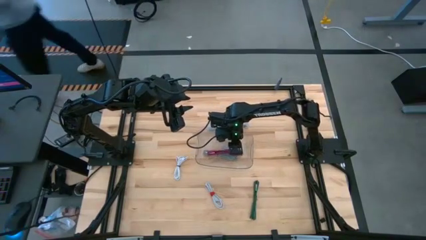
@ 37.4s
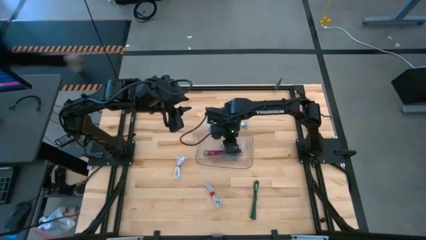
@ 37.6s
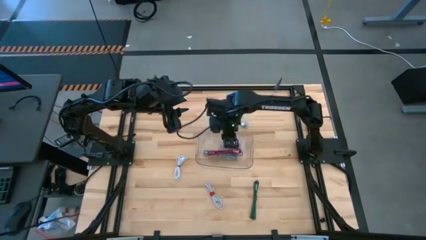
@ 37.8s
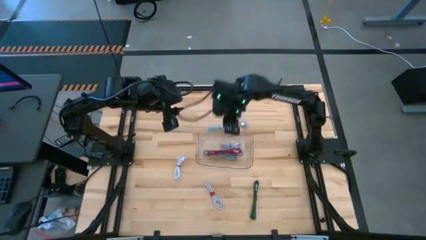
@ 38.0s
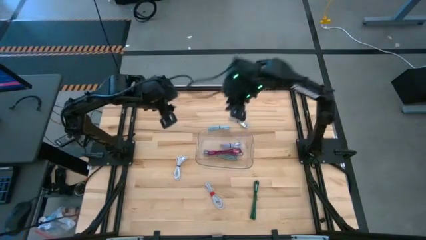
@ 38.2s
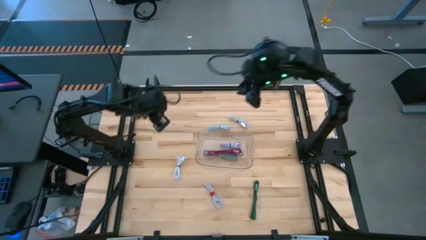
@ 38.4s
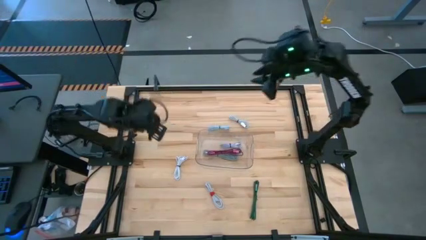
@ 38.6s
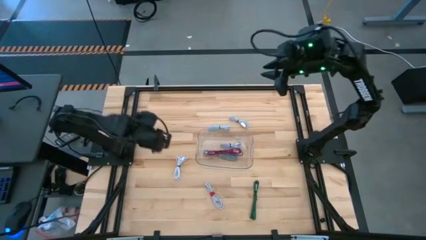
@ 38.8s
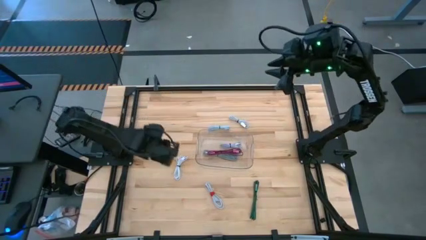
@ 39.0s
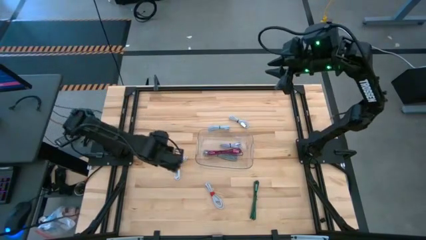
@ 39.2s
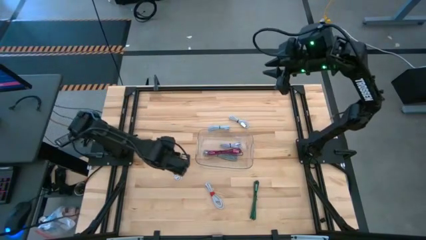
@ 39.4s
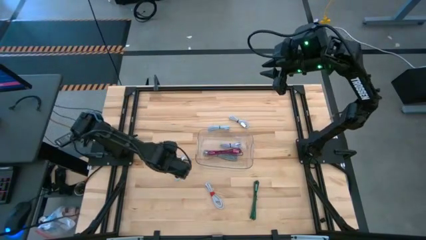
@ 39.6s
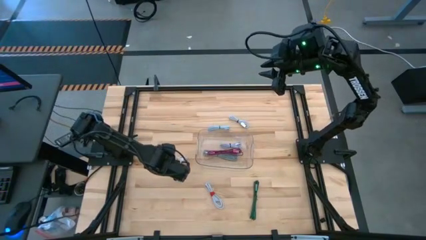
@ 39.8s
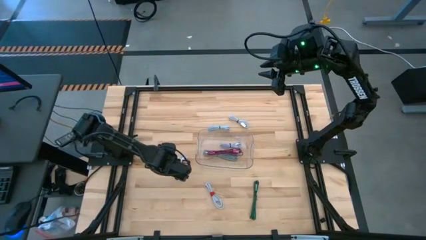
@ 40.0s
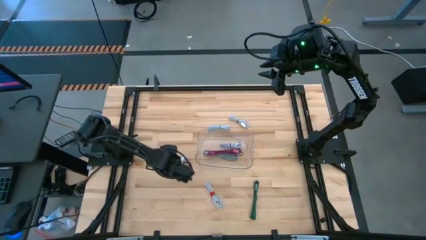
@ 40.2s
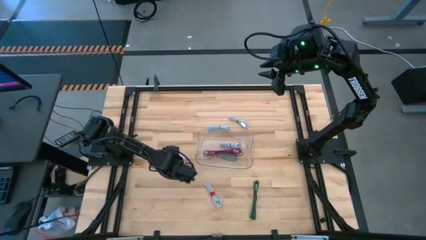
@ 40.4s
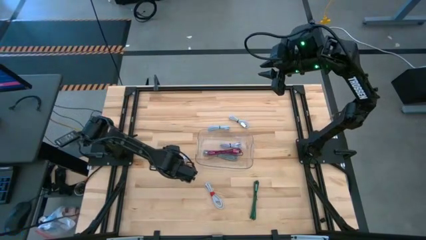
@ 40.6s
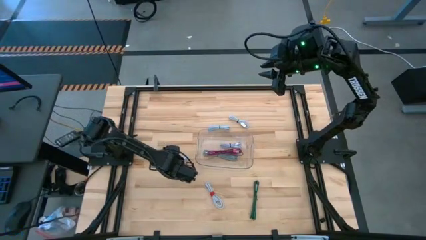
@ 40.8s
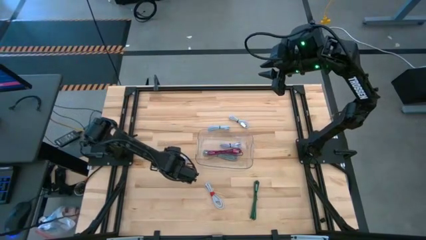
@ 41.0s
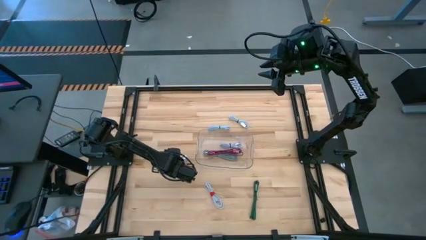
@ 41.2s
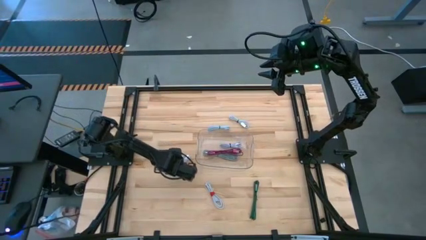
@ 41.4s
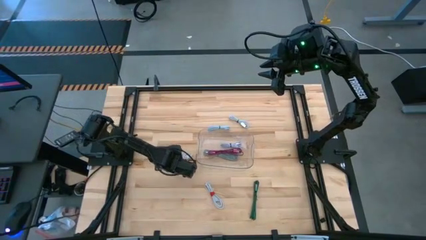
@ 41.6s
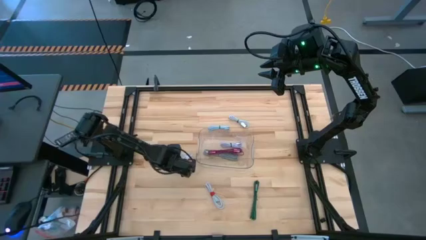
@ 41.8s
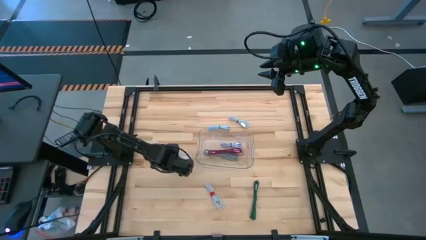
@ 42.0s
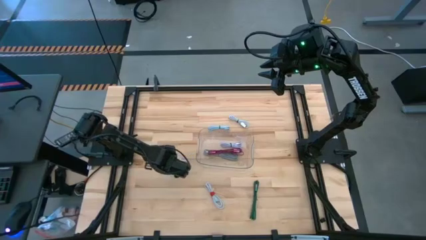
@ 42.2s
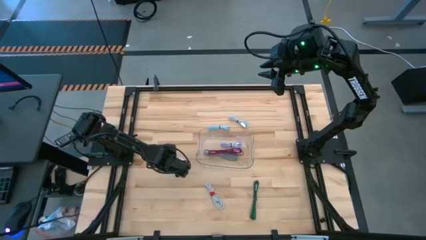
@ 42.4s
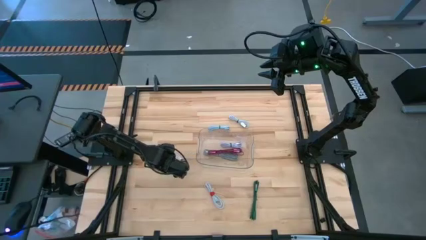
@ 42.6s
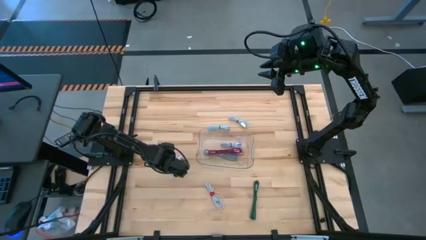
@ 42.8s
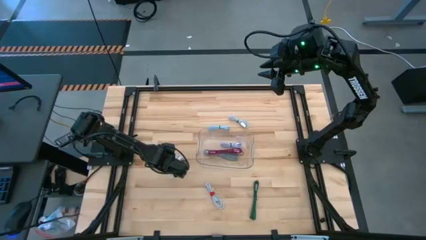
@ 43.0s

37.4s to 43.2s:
Task: Pick and place USB-C Cables
Put the left white charger cable into the transparent bin

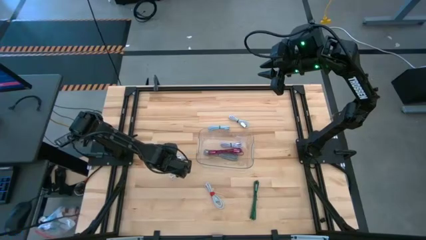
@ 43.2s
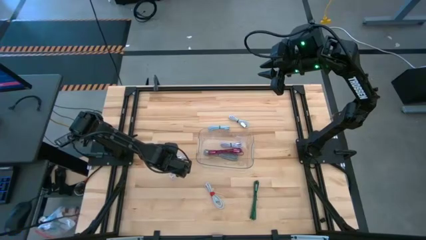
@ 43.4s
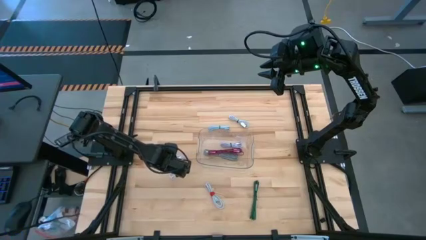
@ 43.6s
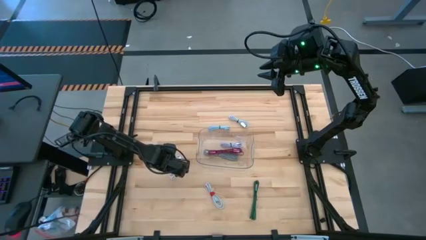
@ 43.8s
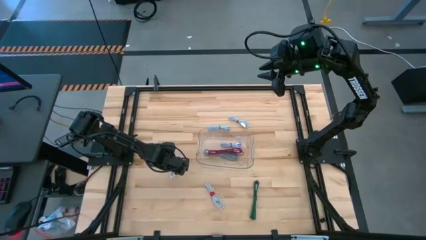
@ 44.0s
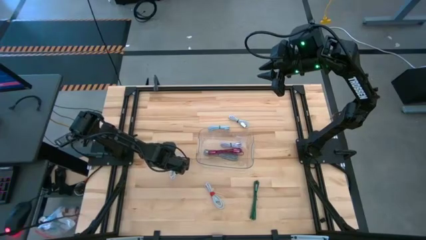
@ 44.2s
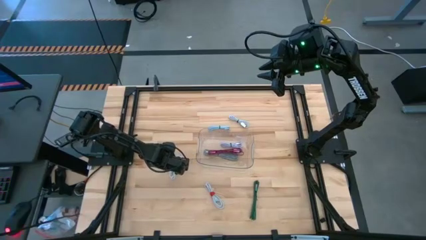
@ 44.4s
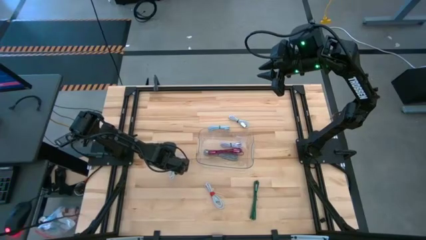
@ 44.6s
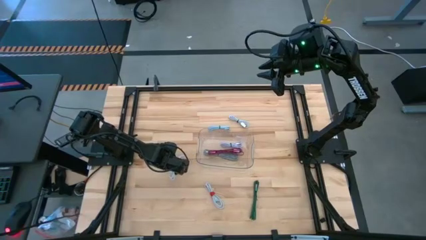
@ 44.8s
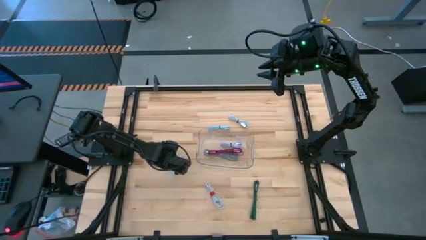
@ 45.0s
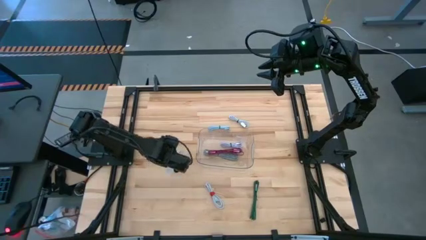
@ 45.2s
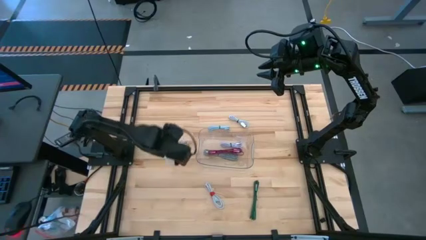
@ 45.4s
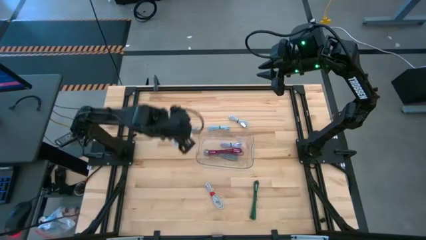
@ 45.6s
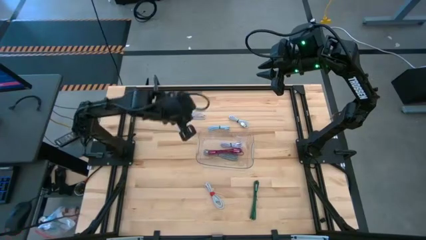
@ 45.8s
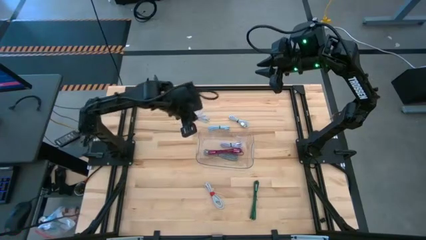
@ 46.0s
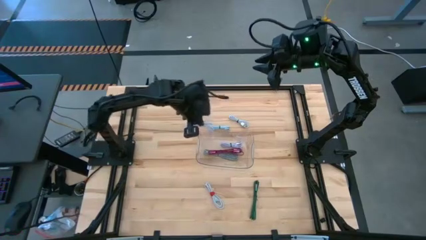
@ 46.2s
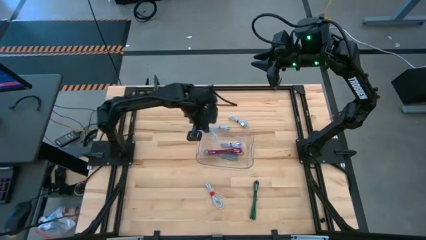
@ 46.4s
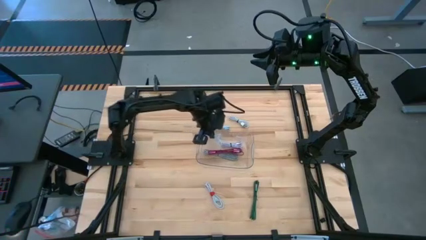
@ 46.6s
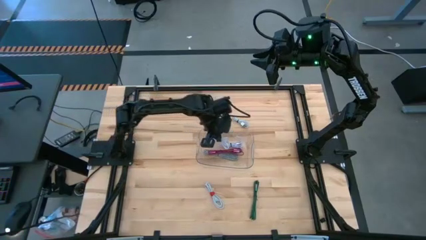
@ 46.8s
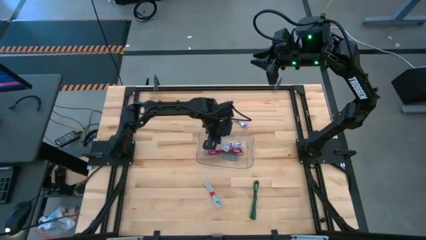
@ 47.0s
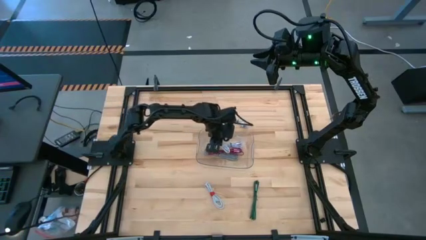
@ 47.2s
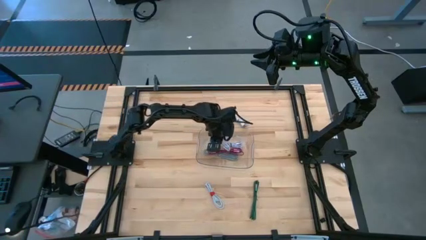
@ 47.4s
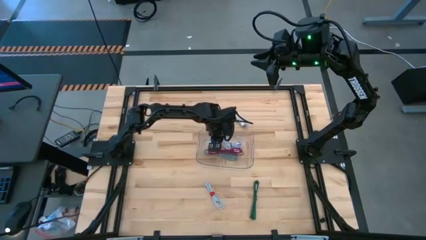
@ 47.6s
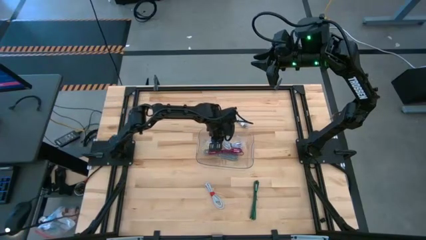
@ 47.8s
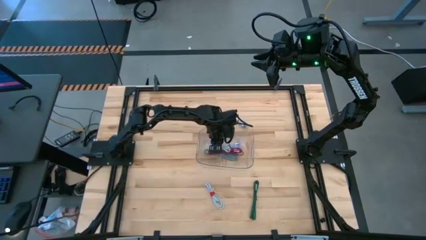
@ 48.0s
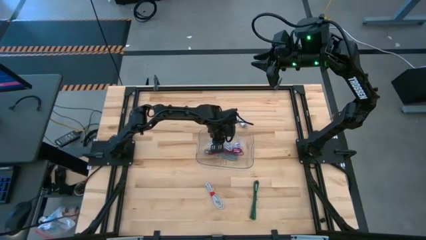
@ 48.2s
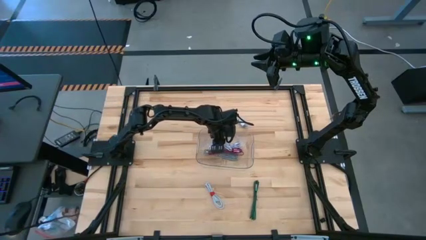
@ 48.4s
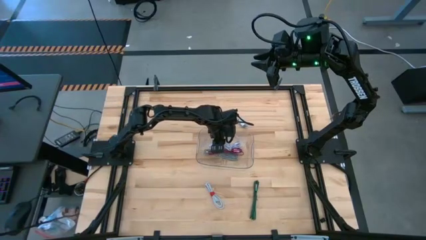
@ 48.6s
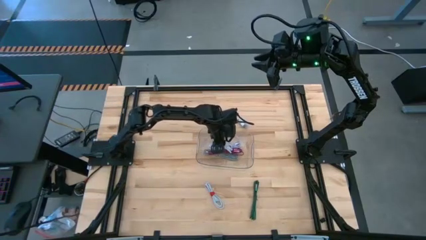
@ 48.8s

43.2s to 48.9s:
Put the left white charger cable into the transparent bin
